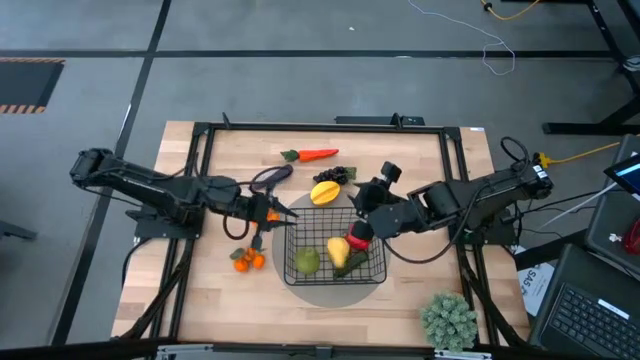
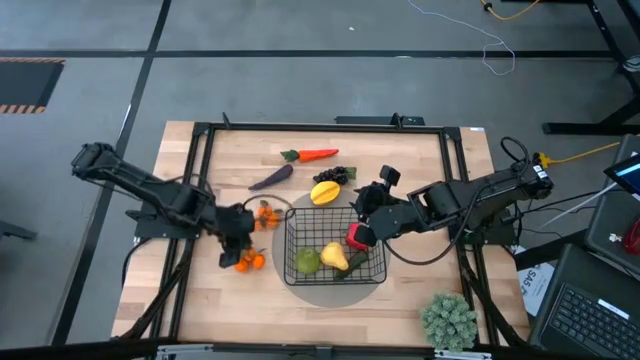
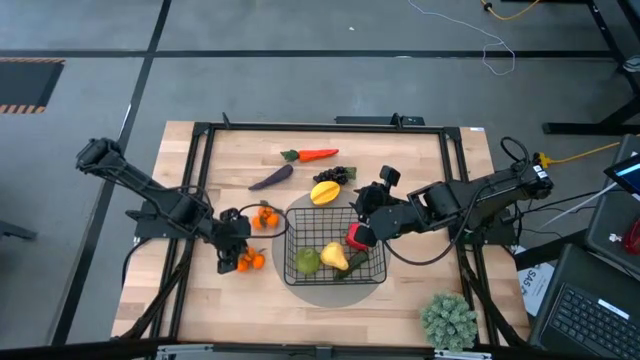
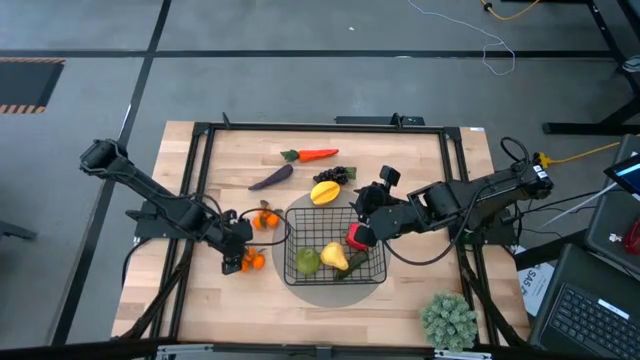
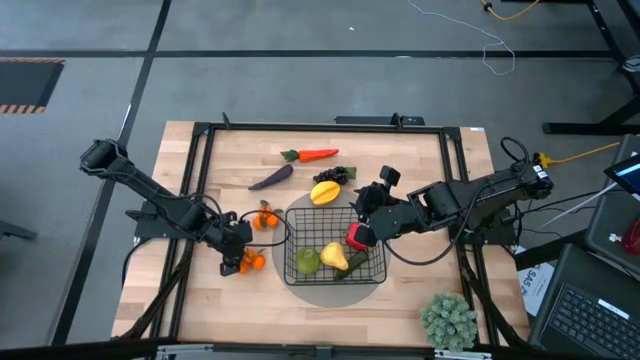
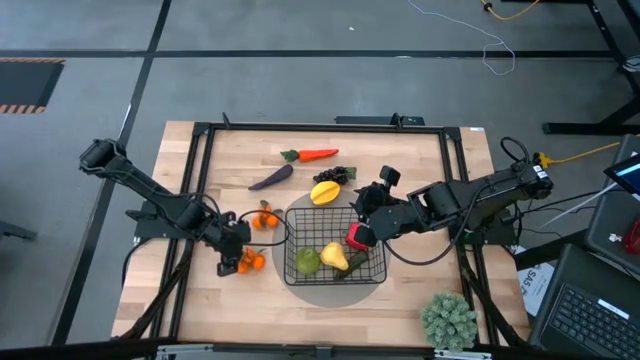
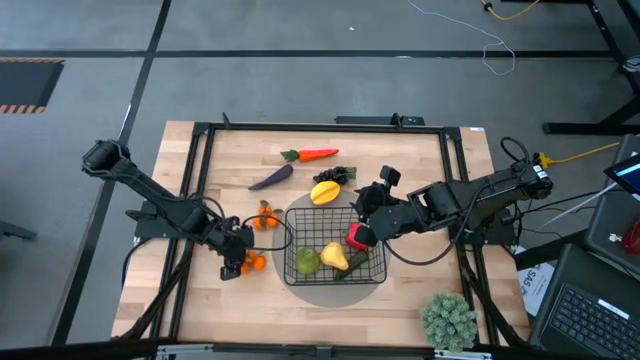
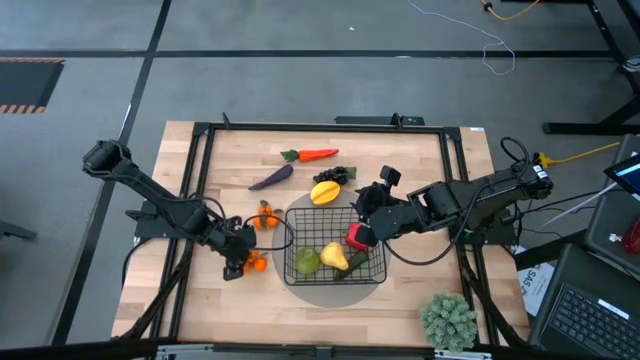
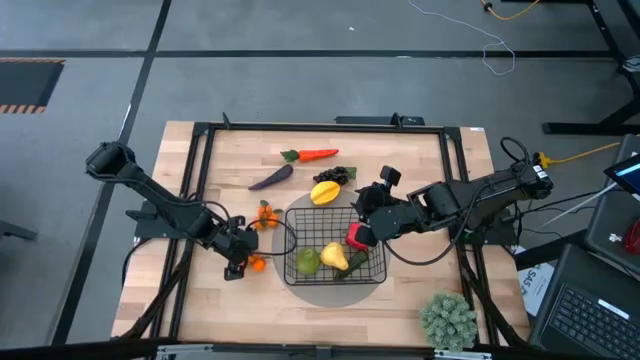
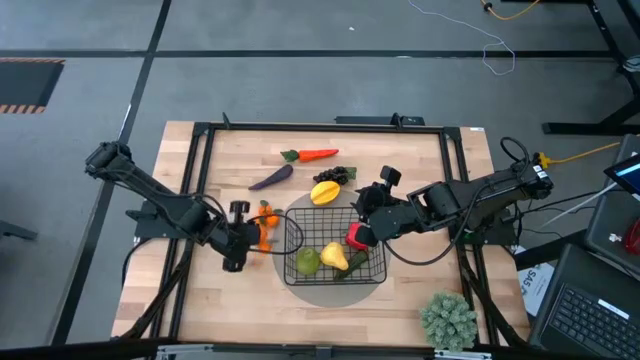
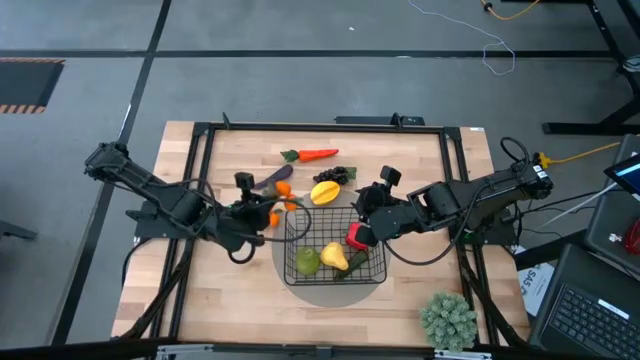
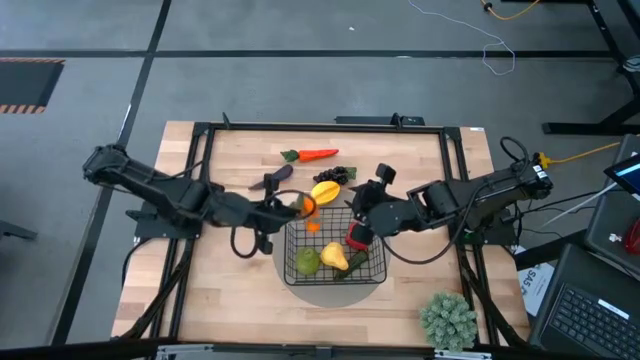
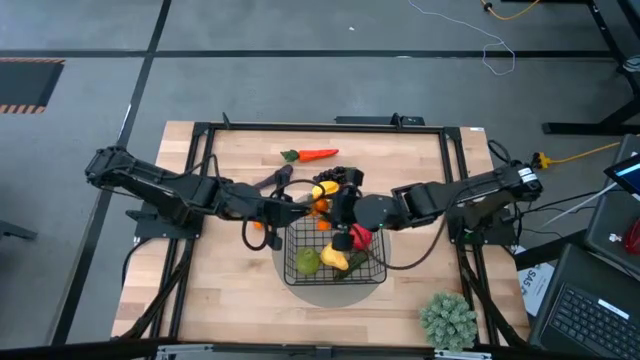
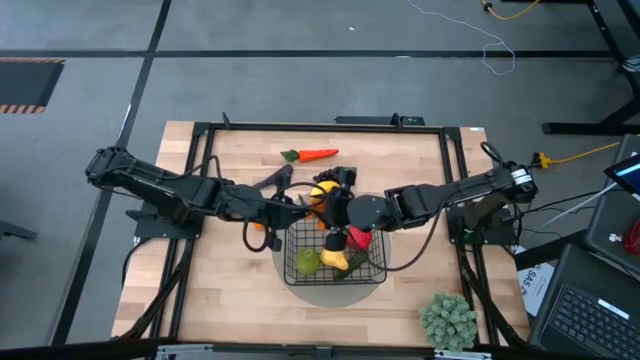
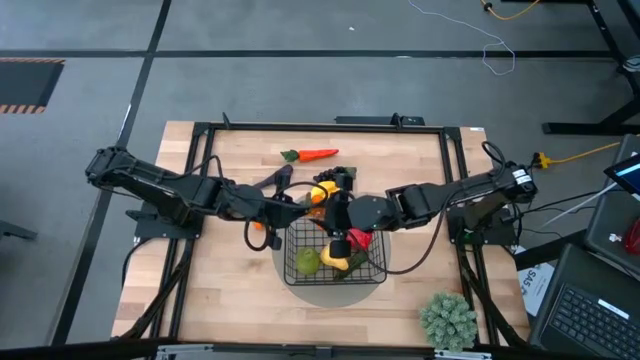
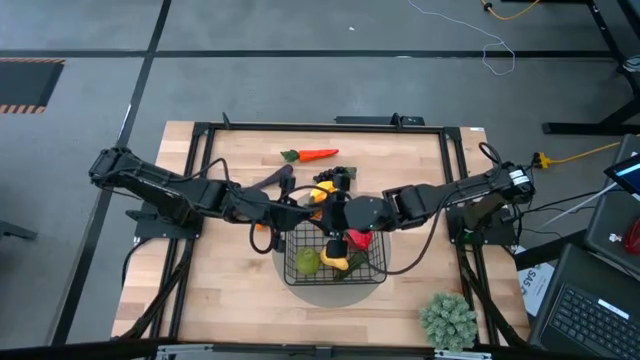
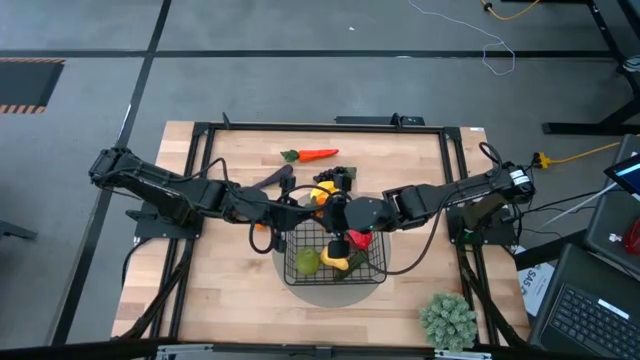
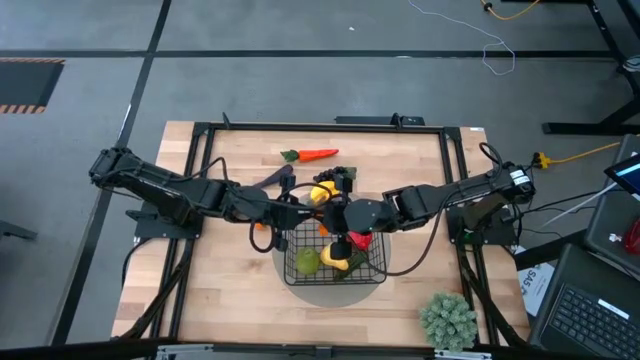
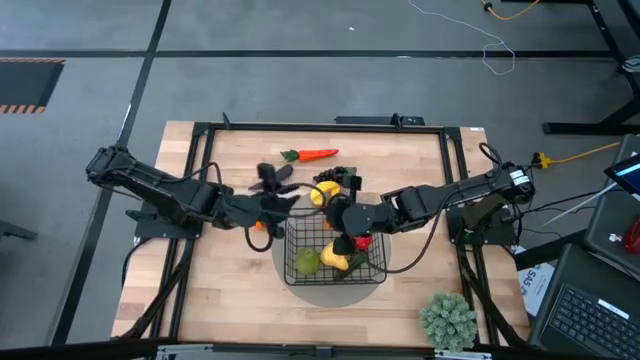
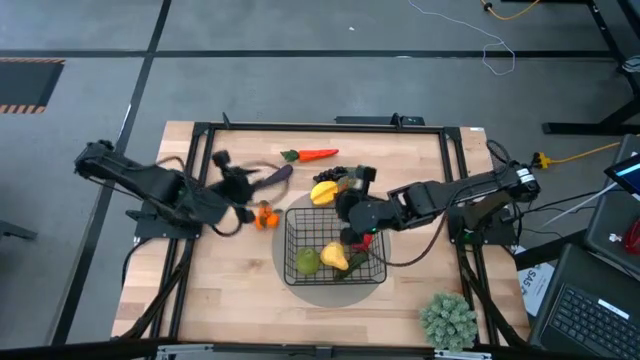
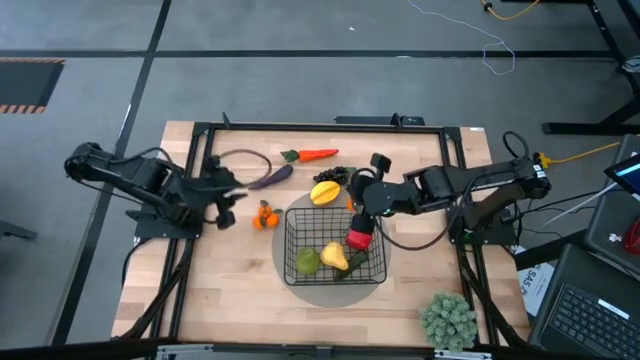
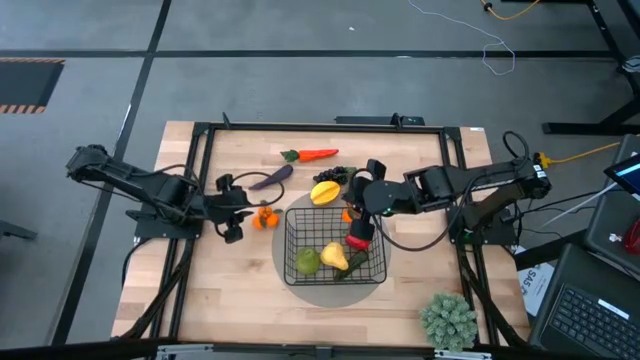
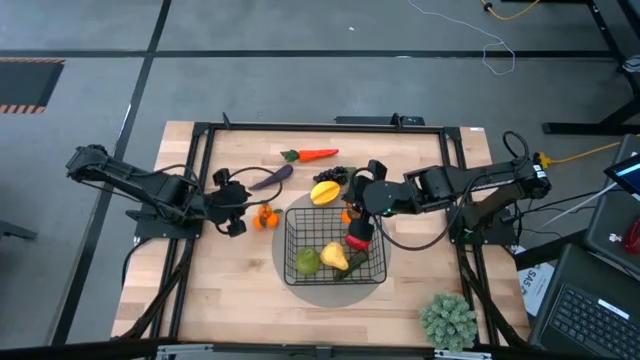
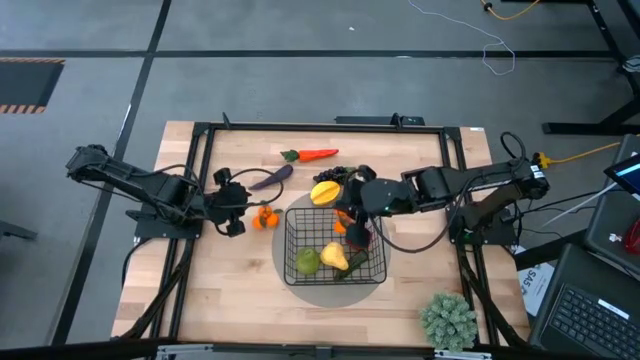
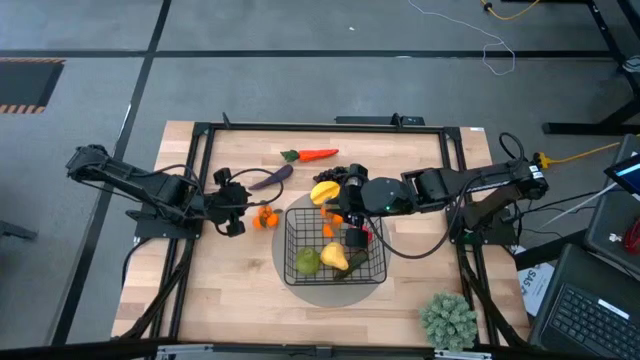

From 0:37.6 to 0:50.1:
Task: Build produce basket
Put the bottom orange tangerine into the black wire basket

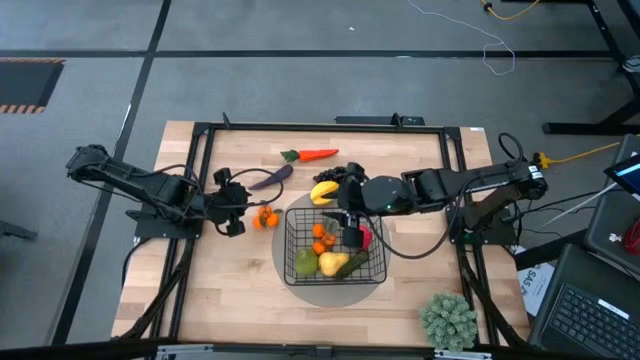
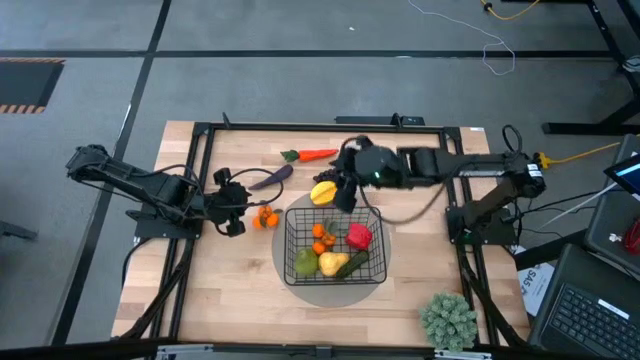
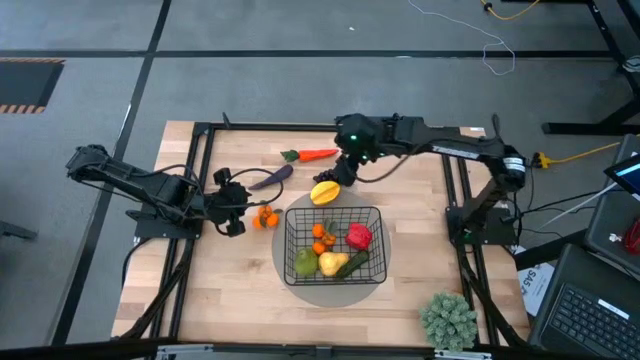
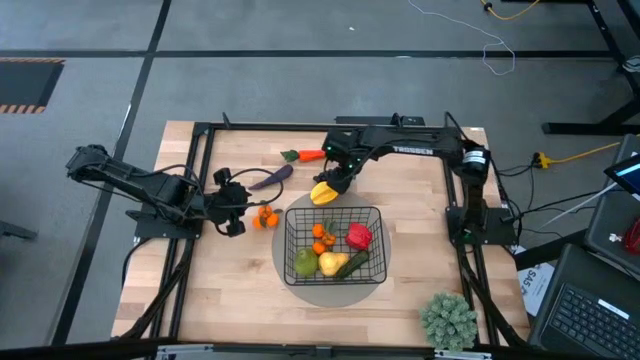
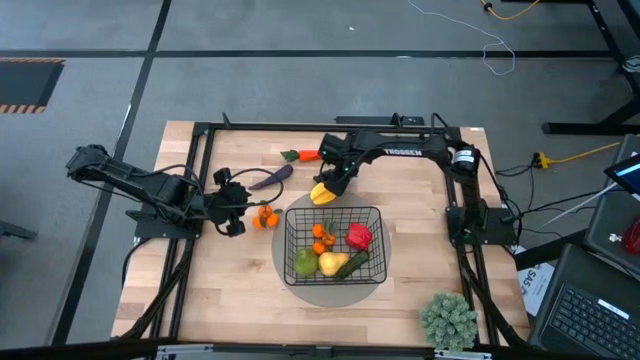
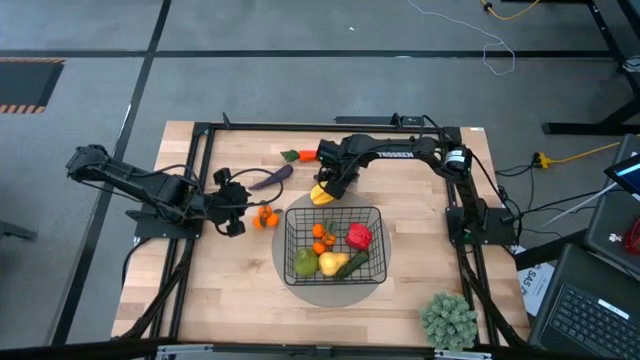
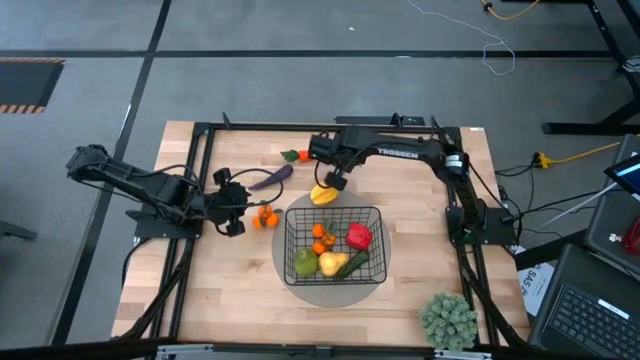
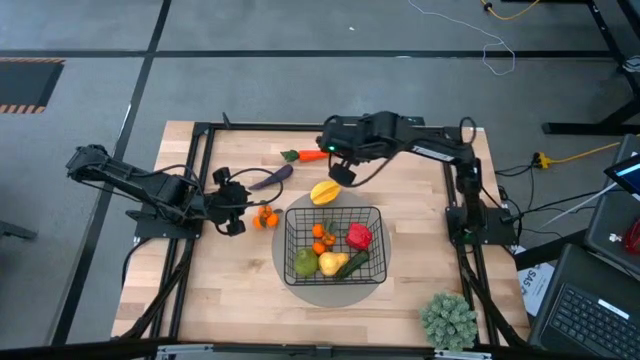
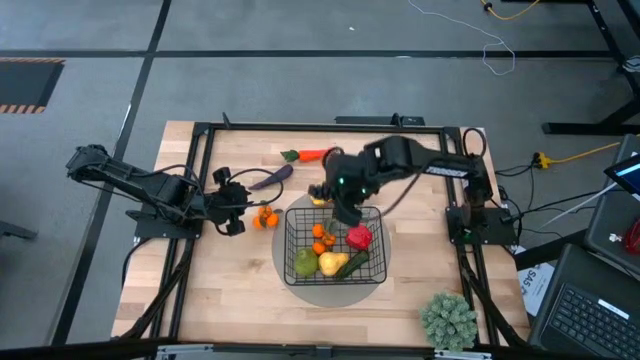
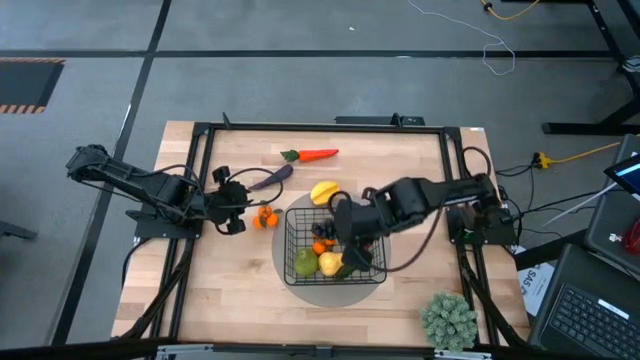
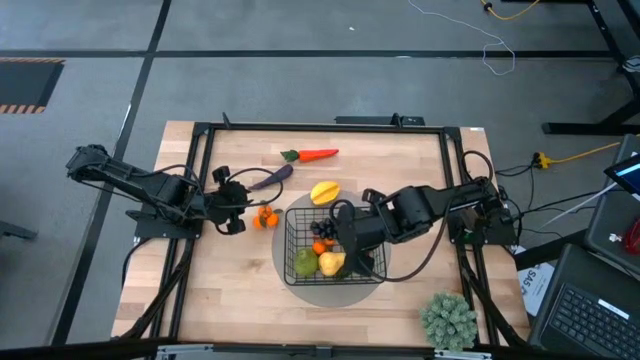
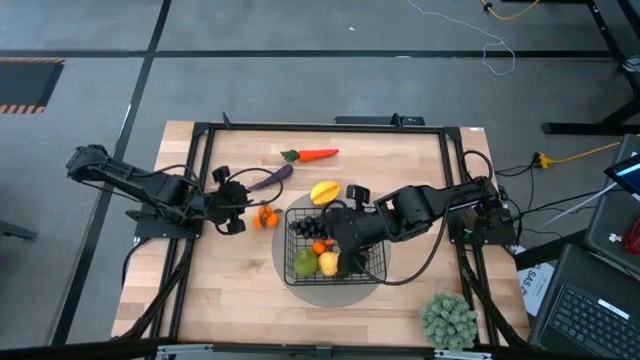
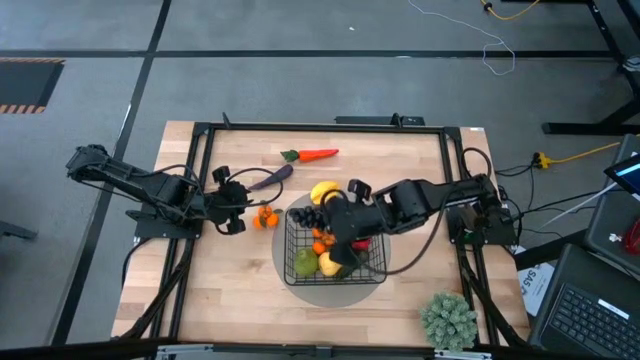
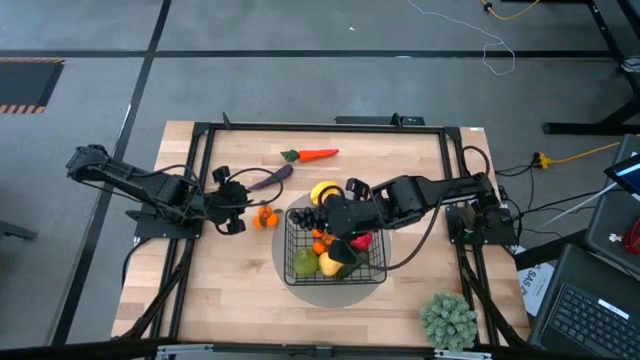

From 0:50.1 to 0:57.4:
Put the violet grapes into the black wire basket
